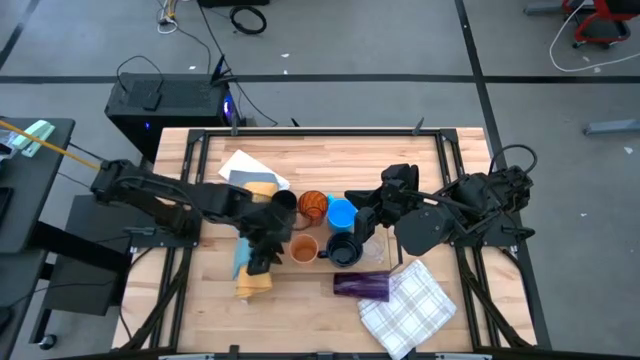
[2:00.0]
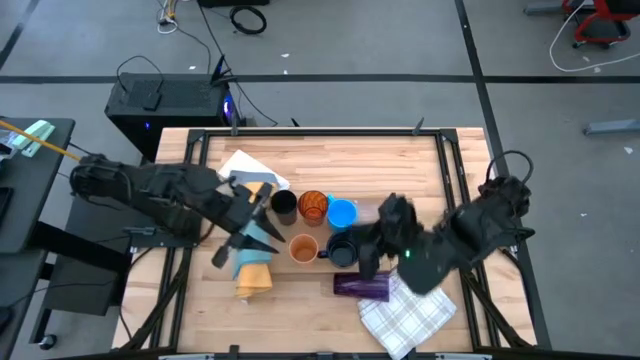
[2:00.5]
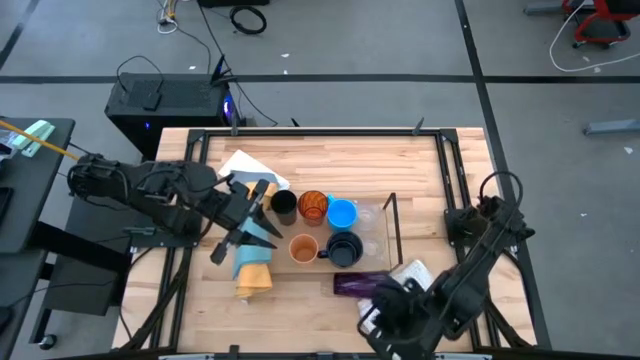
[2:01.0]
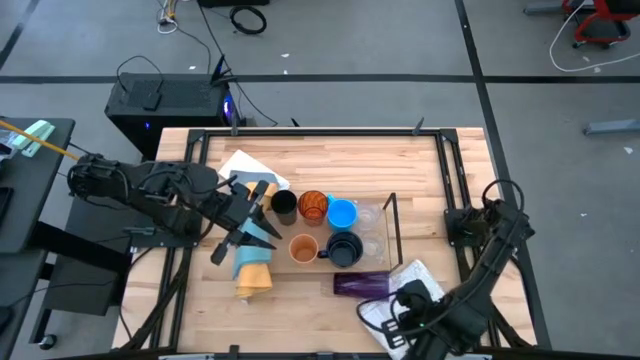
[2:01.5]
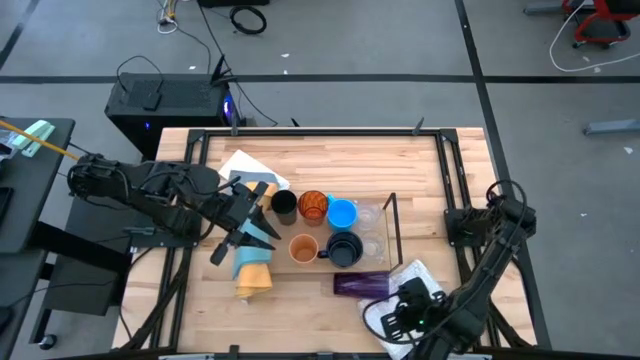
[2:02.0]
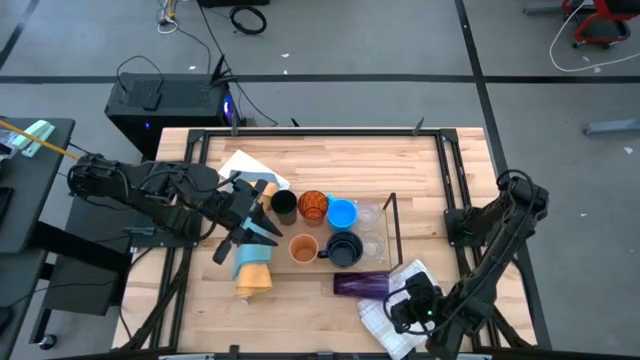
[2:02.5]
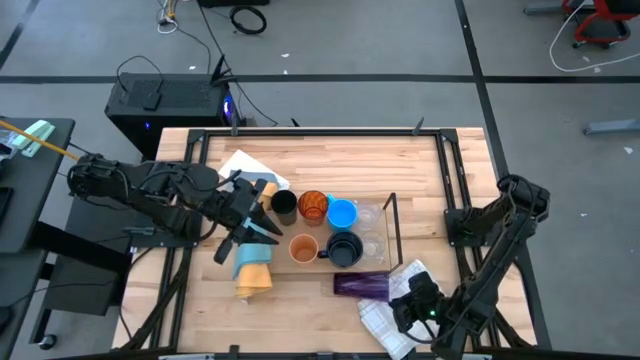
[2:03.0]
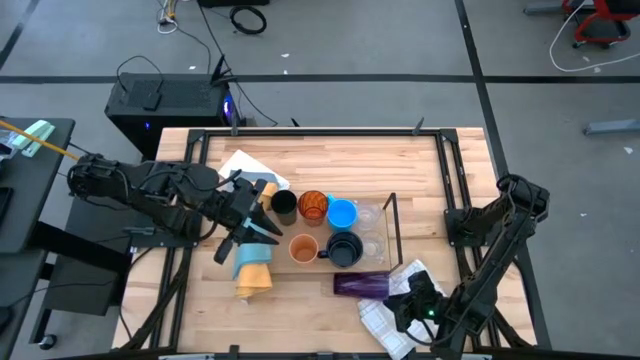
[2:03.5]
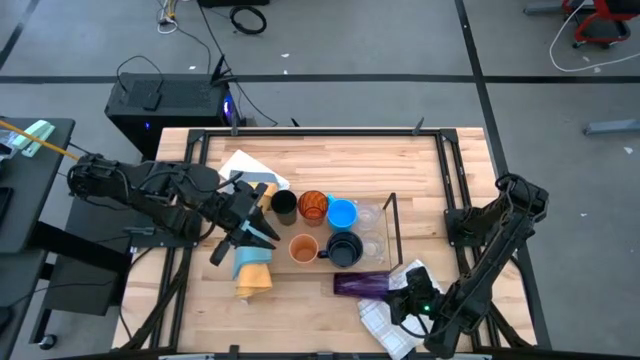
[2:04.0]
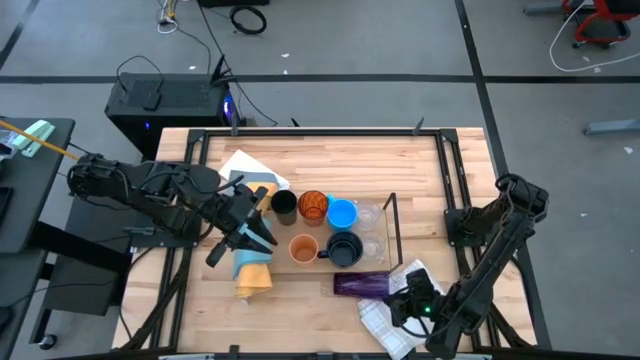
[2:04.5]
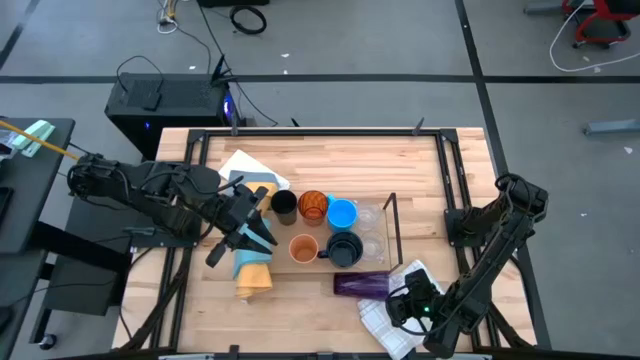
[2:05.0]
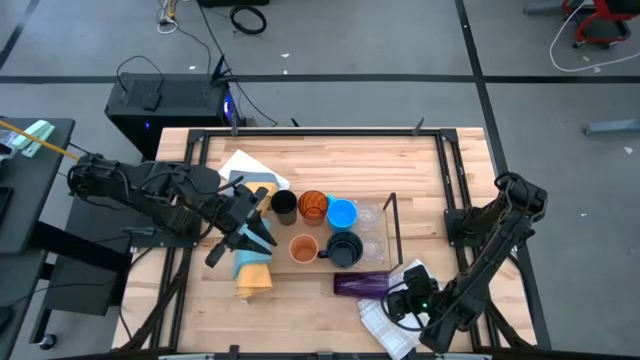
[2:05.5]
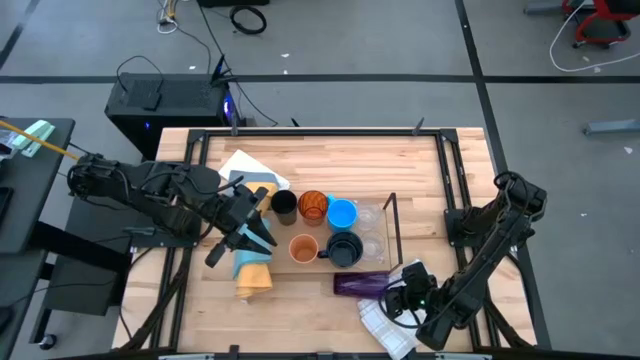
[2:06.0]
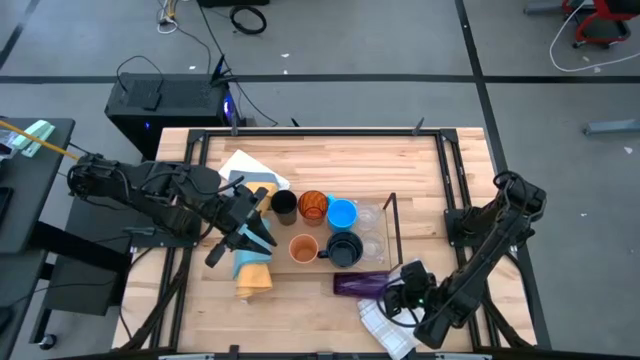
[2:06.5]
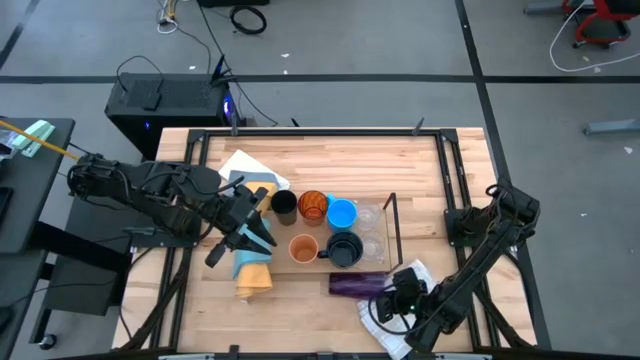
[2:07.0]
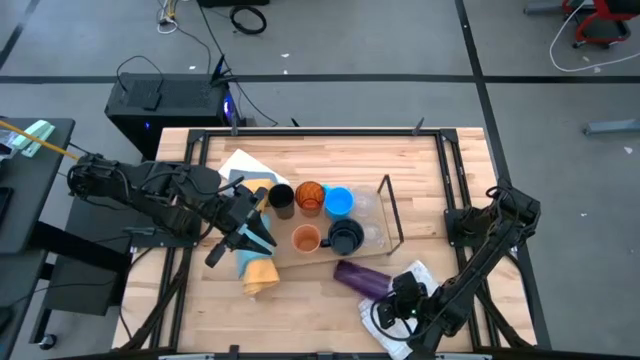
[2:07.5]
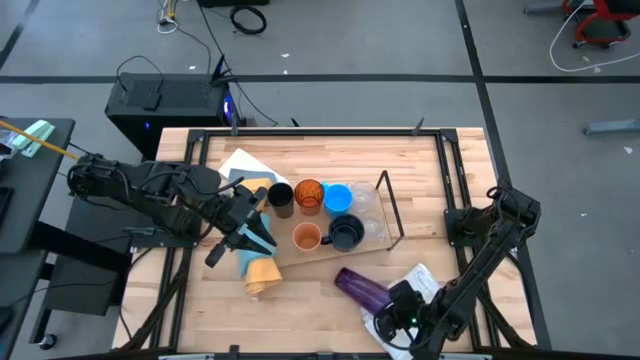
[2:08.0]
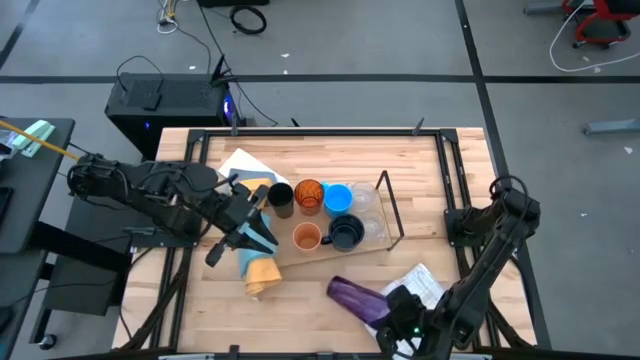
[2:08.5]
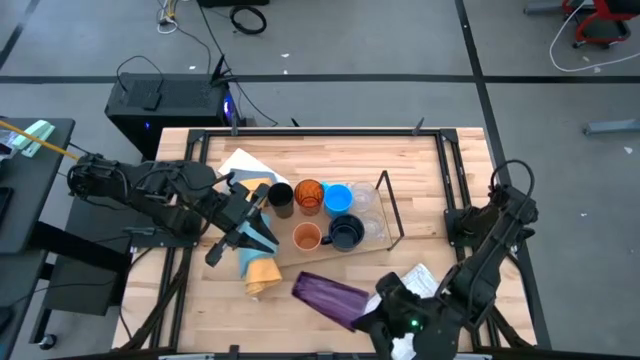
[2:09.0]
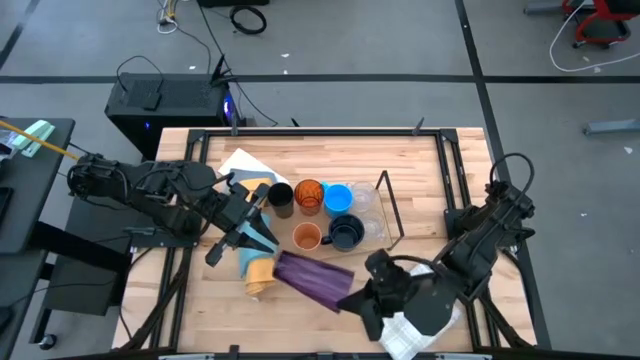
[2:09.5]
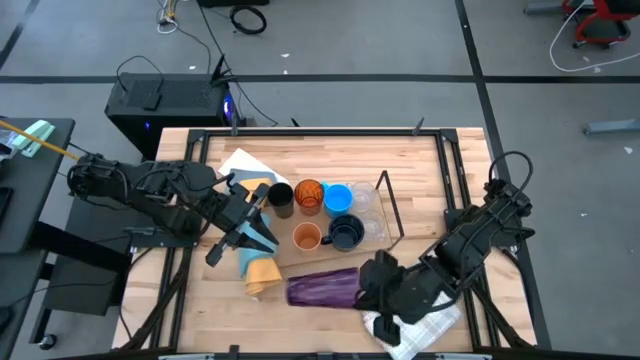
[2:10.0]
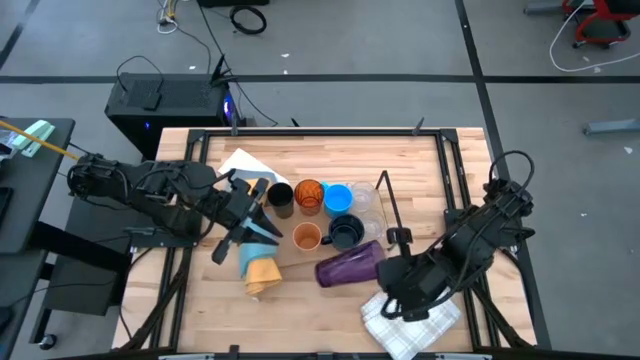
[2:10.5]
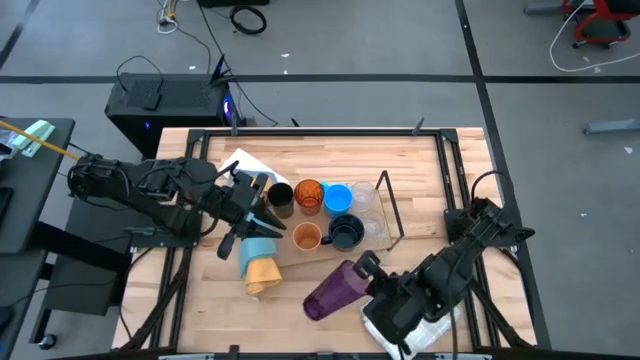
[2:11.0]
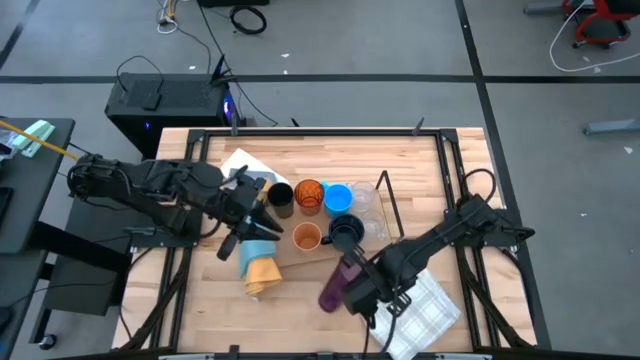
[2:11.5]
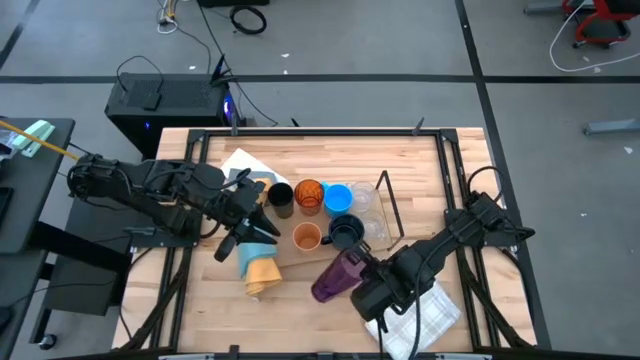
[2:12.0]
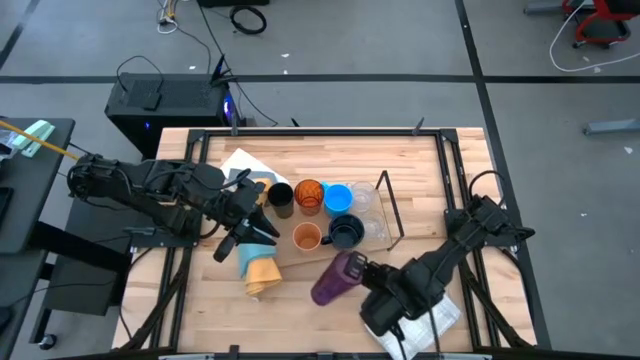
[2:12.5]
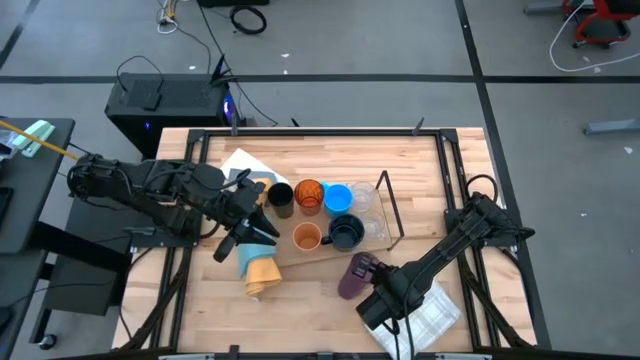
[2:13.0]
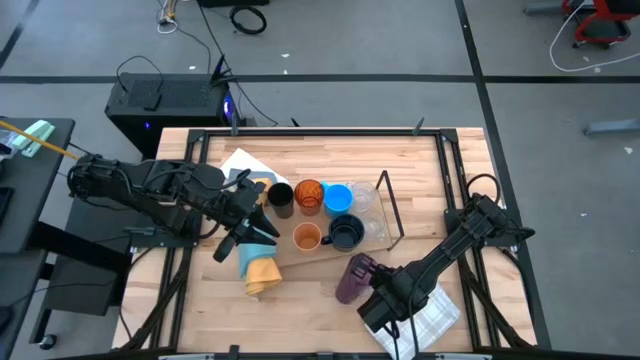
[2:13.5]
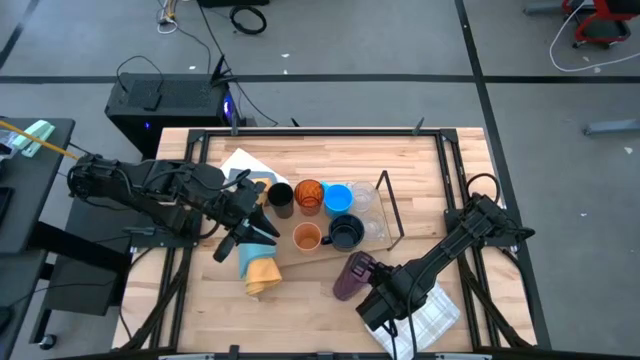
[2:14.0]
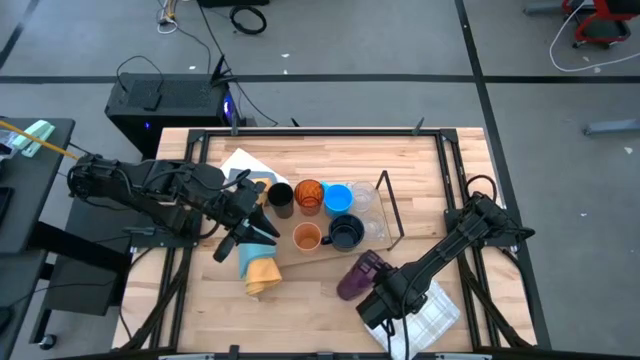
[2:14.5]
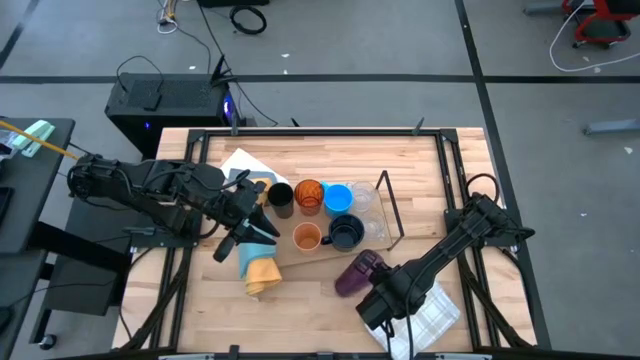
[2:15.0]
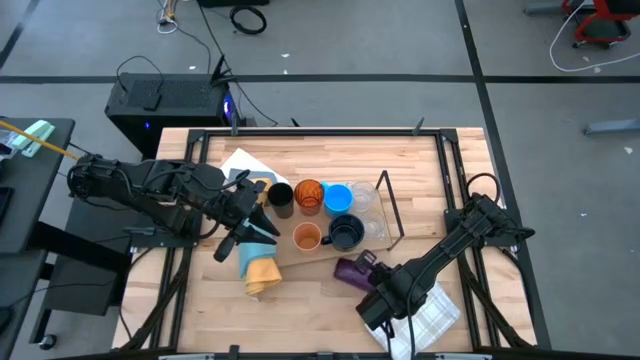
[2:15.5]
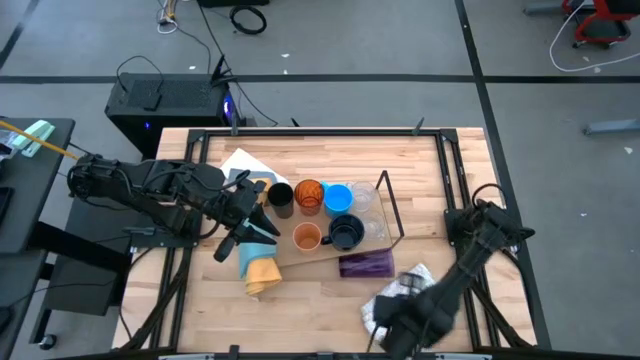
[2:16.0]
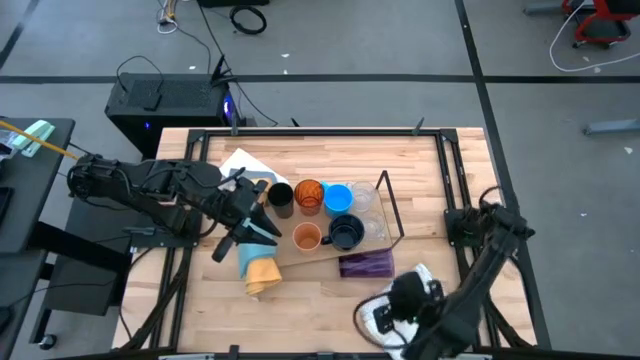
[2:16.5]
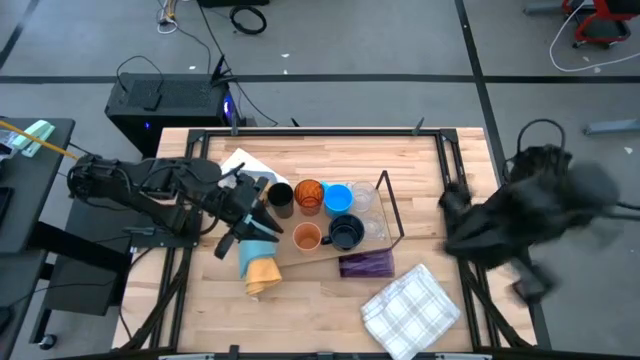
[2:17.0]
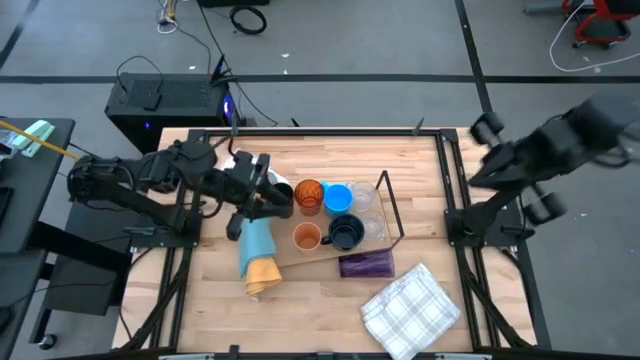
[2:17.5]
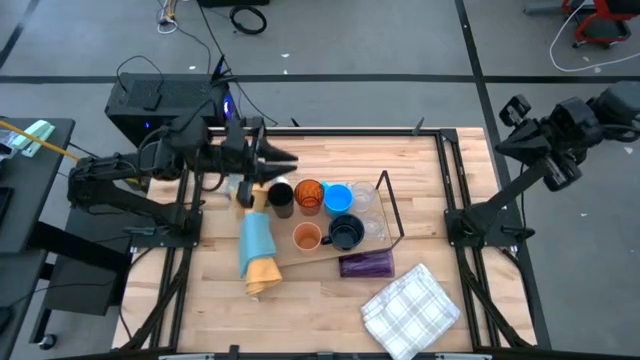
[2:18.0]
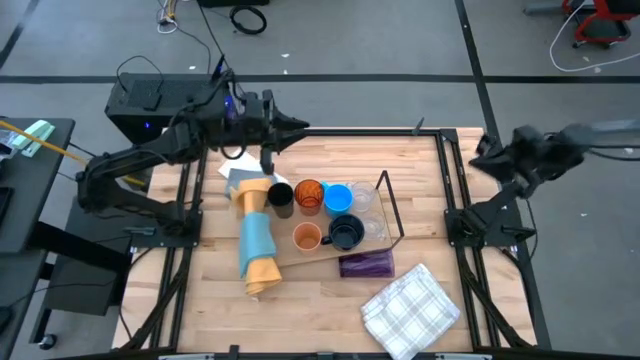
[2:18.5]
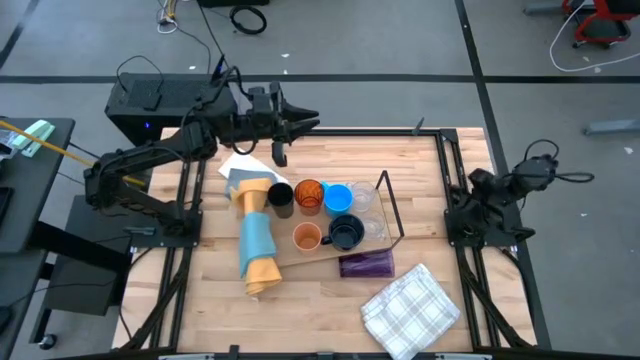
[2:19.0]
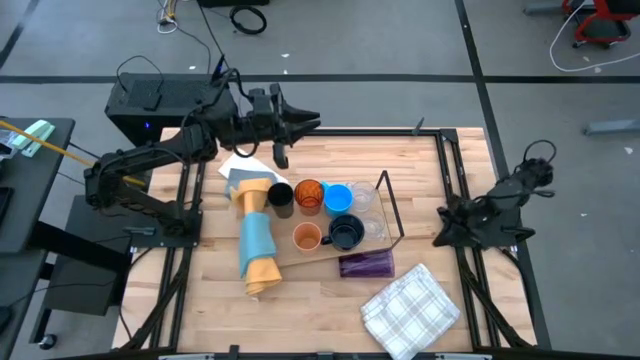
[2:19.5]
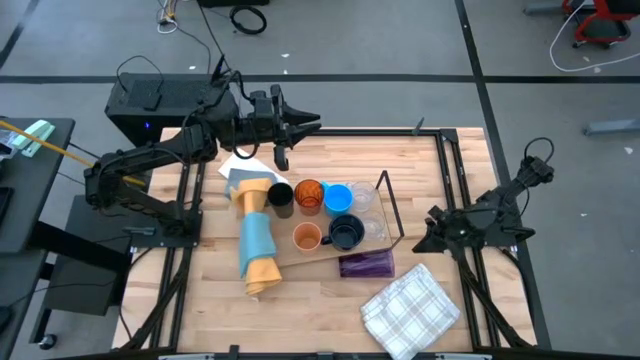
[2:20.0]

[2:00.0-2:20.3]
Task: Stack small to large cups/mugs on shelf
Put the violet cup on the shelf

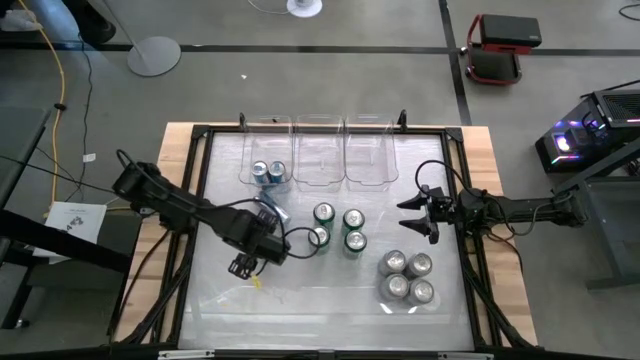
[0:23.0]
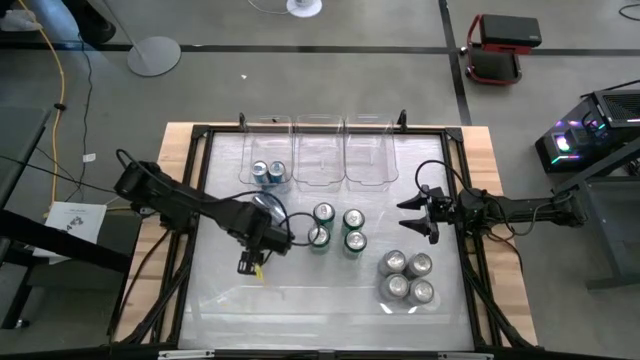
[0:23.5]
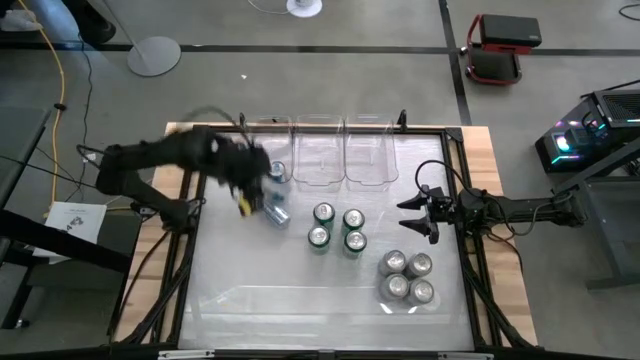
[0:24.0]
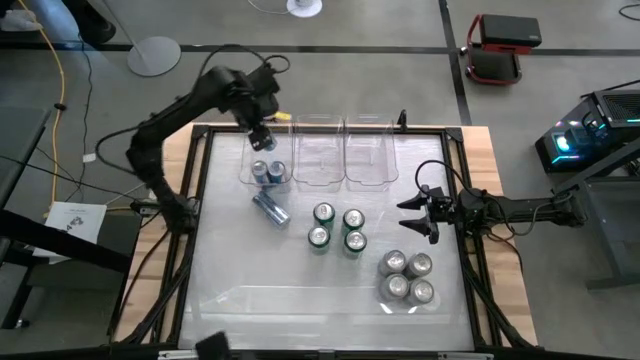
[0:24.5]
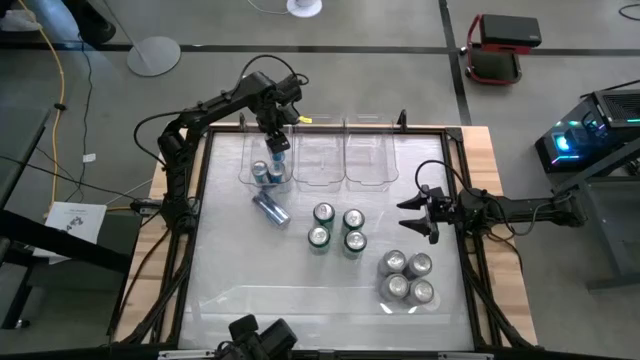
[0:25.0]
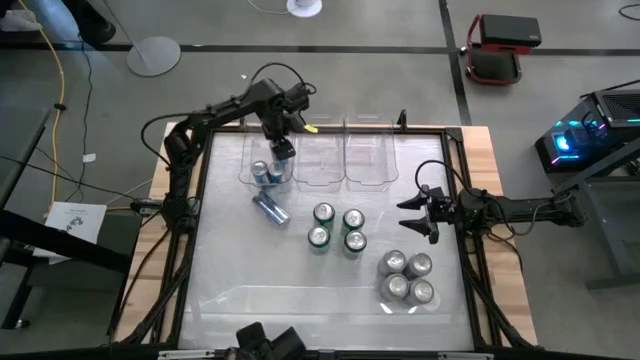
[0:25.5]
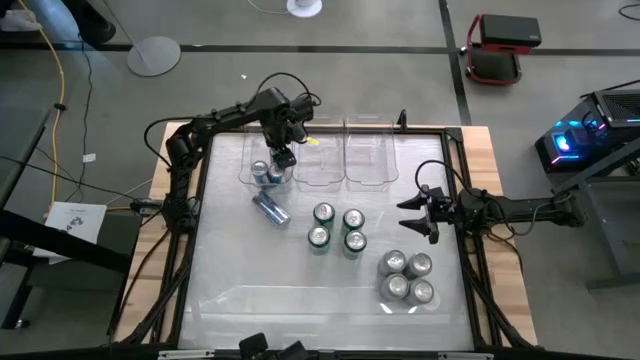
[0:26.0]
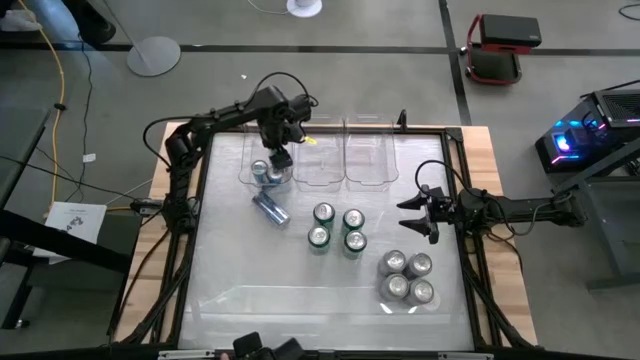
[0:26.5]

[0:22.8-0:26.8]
Task: Sort soda cans
Put the bottom blue soda can into the left transparent bin
